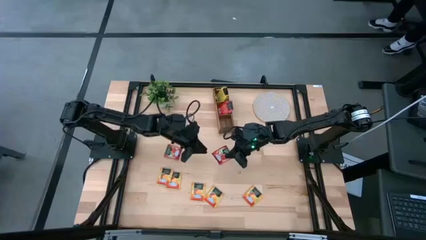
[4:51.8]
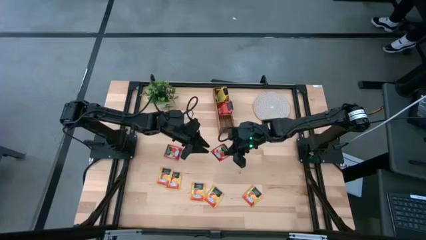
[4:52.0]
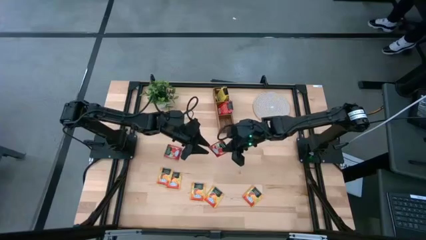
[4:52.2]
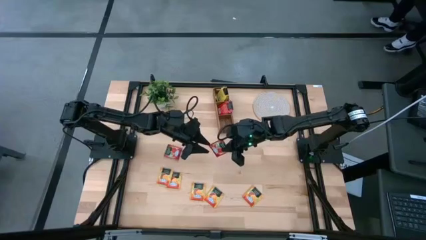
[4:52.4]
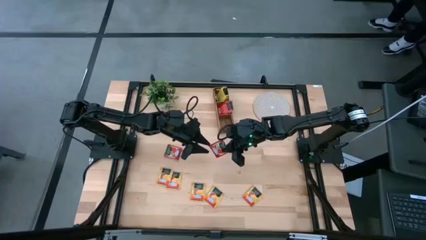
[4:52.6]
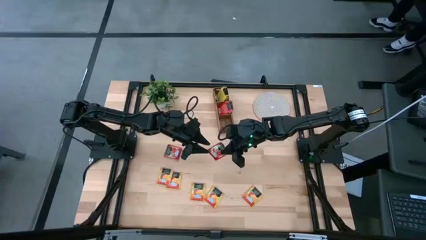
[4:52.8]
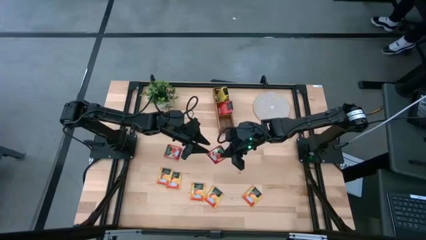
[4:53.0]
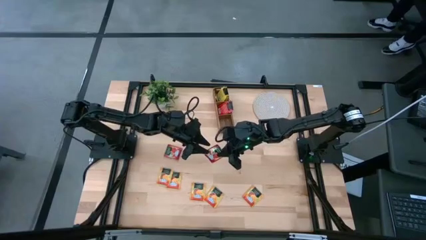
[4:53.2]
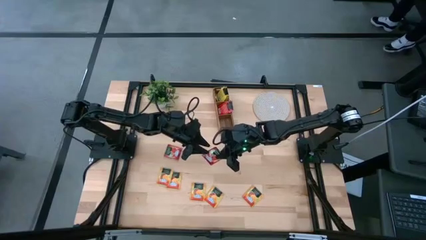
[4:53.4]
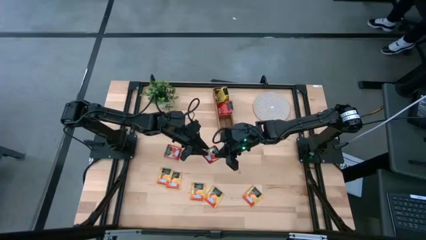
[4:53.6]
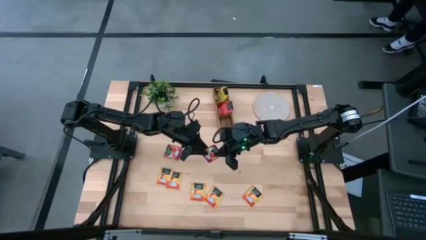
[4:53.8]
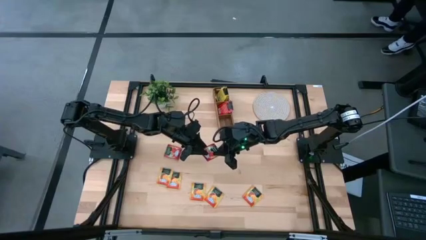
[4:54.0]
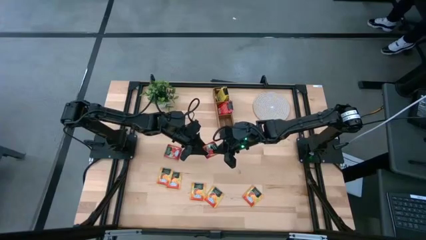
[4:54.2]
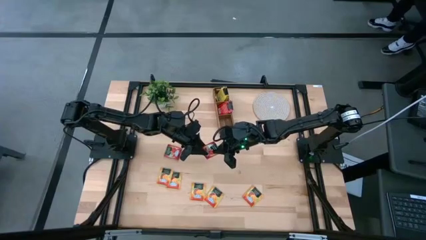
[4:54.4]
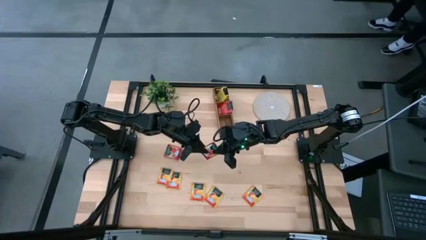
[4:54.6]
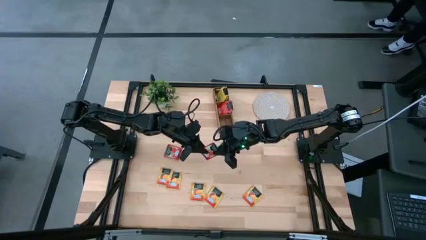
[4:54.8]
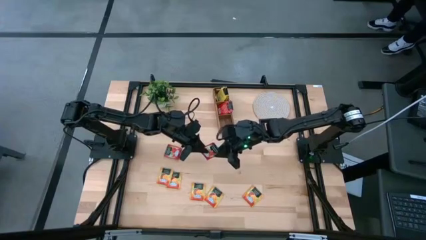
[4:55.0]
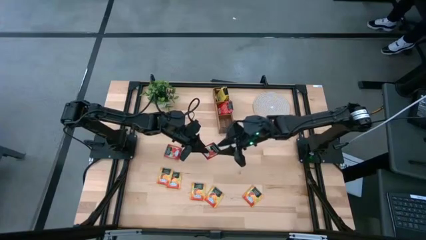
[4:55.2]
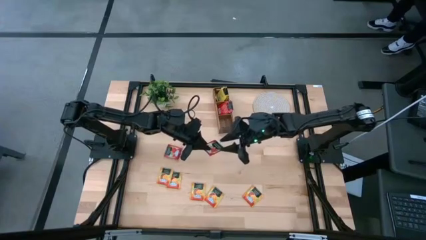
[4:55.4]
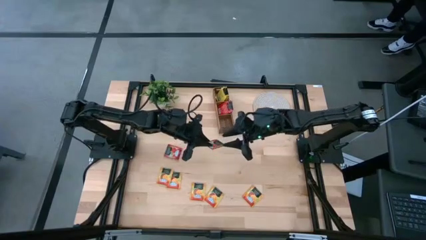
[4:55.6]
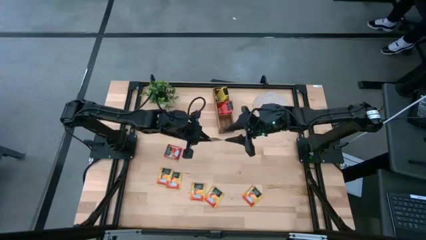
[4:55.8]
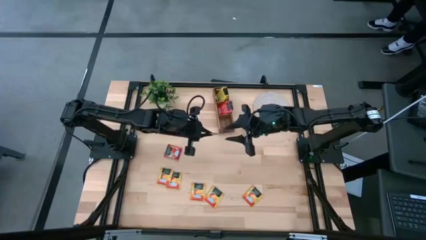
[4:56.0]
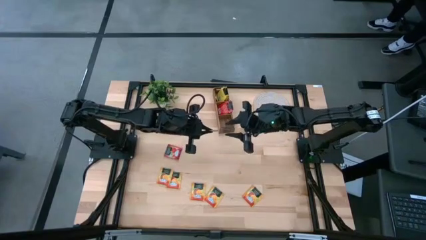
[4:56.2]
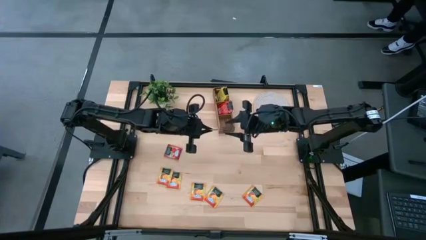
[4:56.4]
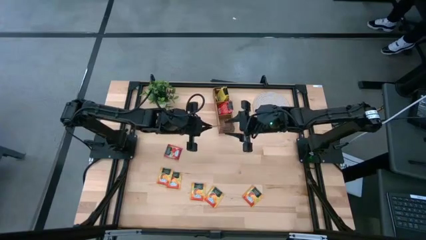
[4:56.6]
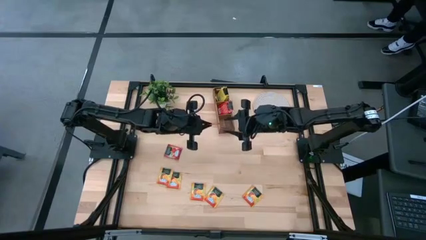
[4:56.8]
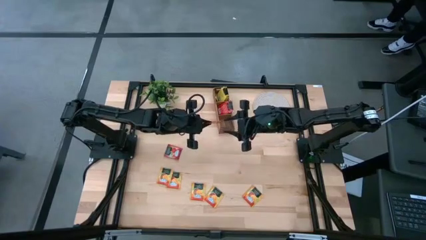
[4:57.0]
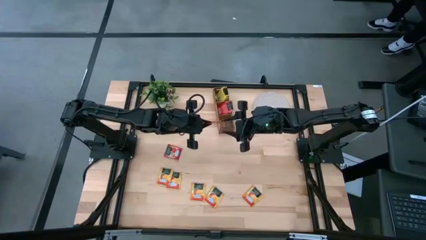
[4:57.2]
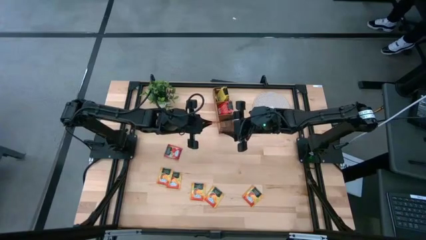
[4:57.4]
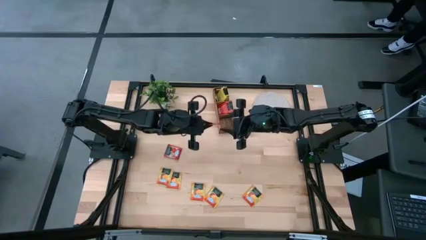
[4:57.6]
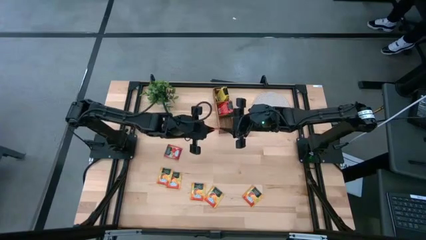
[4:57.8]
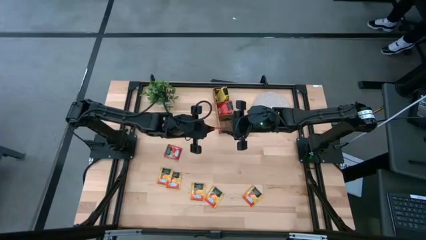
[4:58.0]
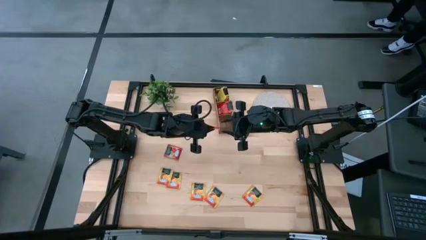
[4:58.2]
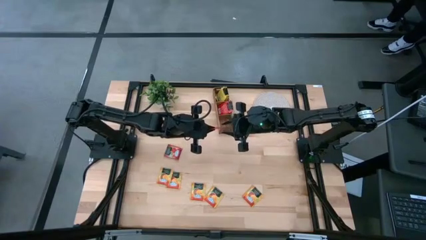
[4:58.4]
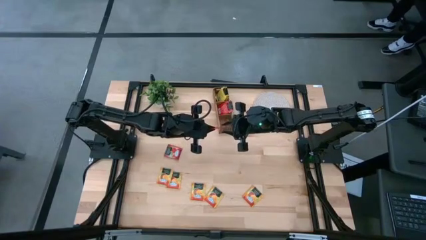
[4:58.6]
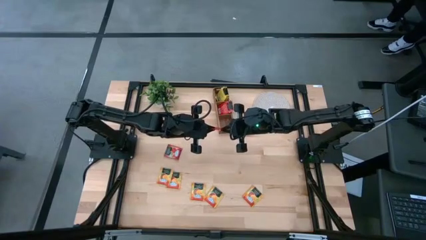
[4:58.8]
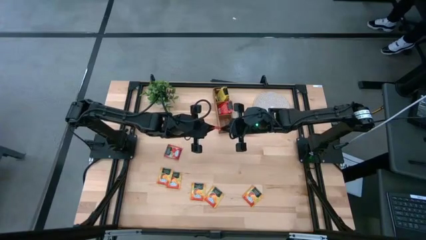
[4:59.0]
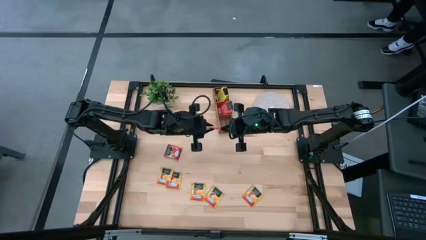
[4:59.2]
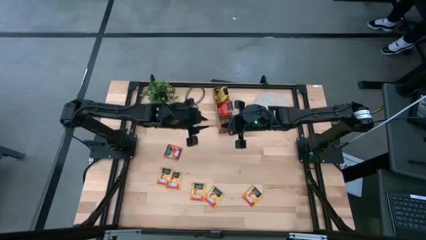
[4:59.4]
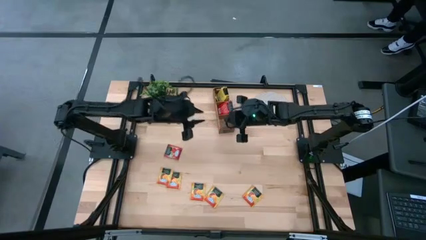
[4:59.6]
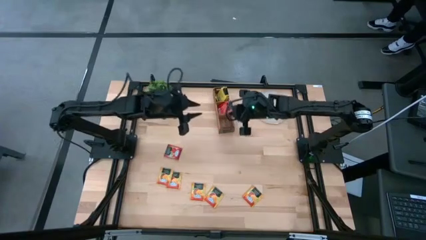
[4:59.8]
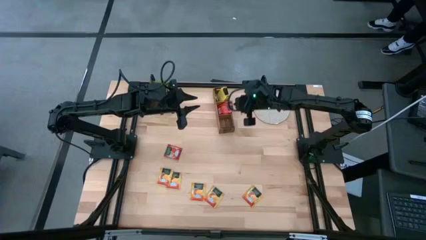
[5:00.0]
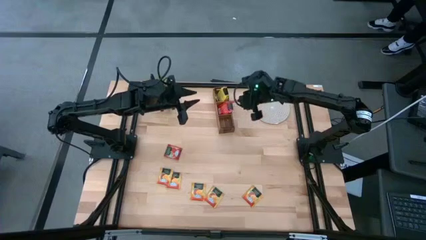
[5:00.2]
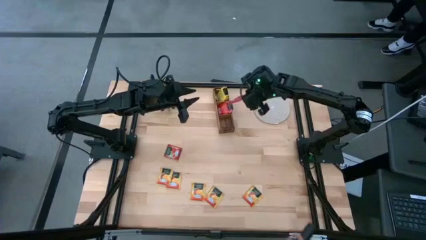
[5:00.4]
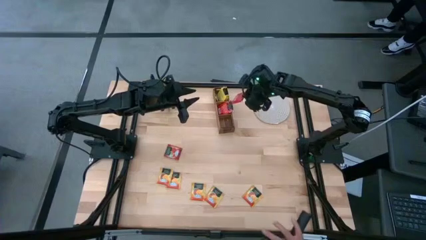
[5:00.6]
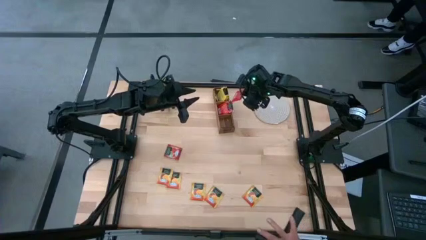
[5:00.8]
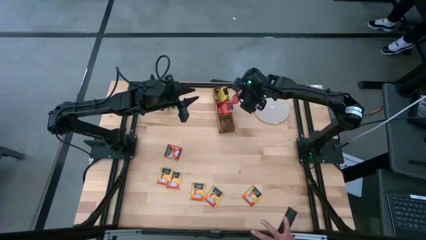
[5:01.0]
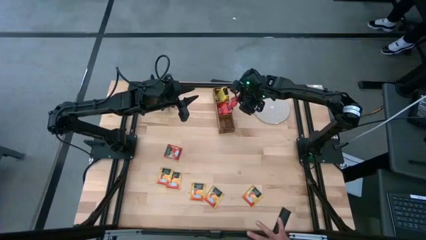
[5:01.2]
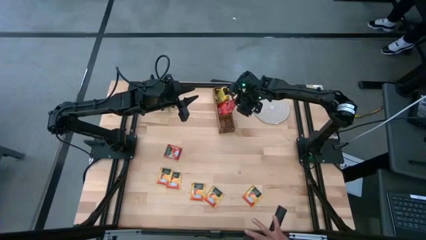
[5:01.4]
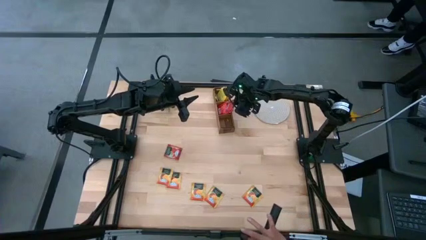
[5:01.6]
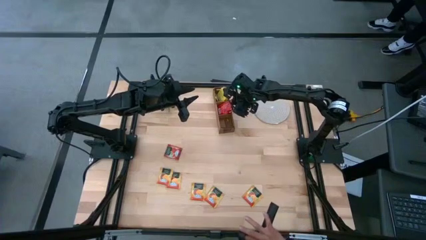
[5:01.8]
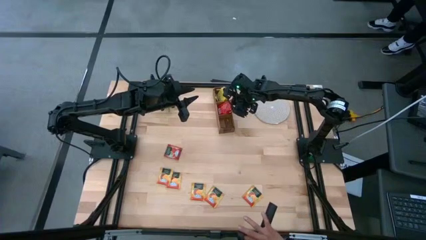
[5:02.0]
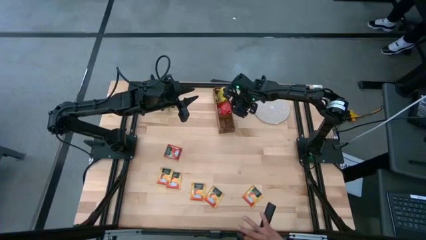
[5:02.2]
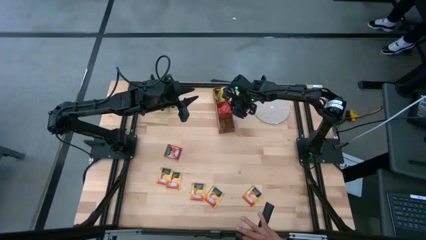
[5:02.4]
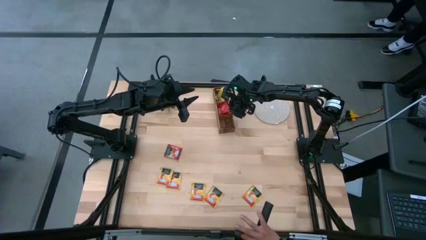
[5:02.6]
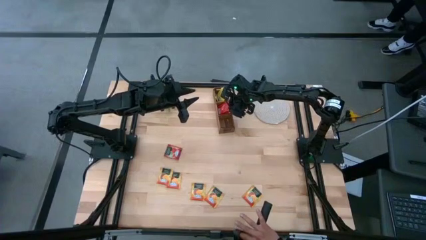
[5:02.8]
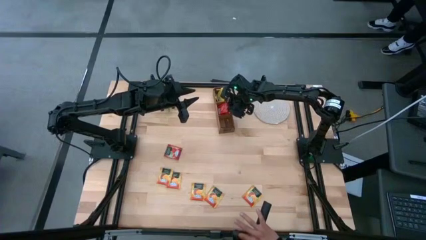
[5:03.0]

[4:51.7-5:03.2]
Task: Pick & Place Tea
Put the red tea bag into the middle section of the wooden organizer

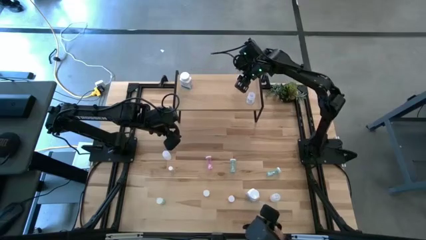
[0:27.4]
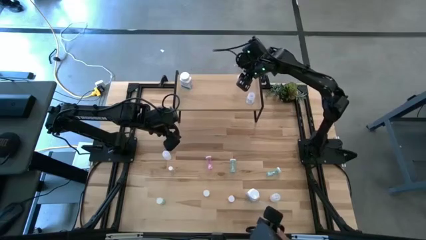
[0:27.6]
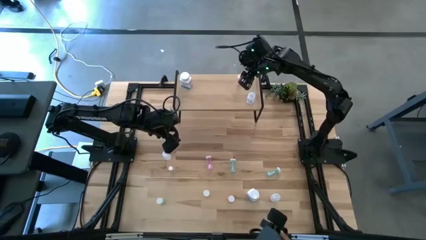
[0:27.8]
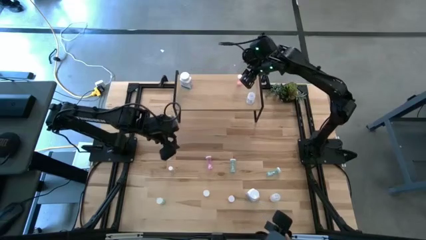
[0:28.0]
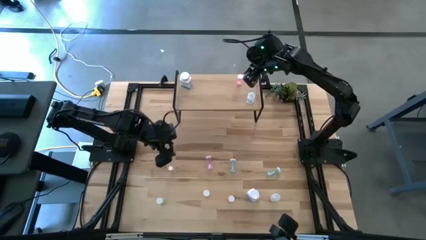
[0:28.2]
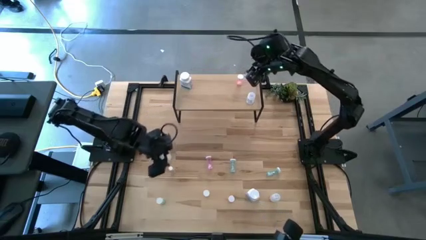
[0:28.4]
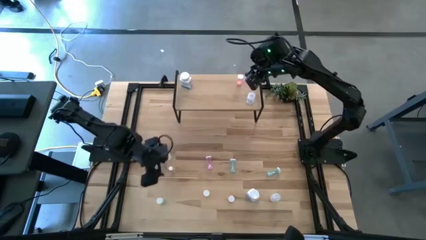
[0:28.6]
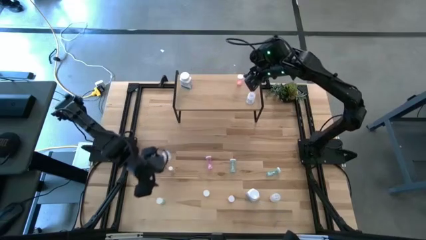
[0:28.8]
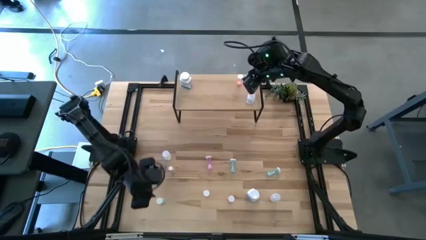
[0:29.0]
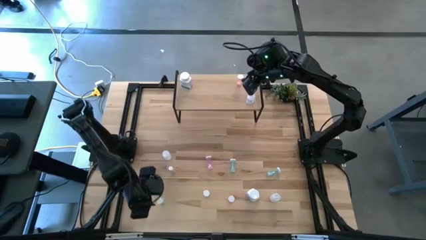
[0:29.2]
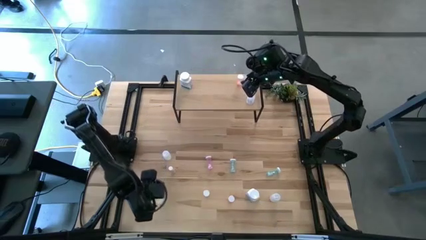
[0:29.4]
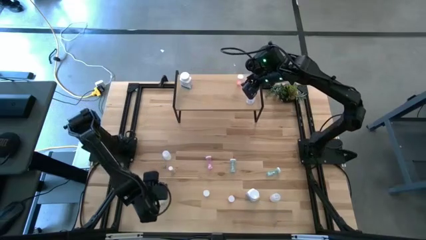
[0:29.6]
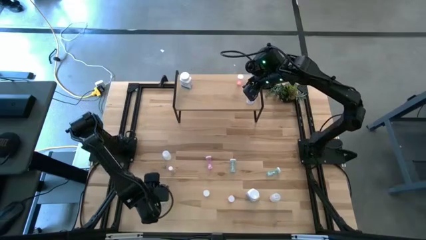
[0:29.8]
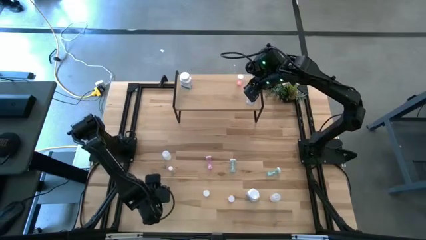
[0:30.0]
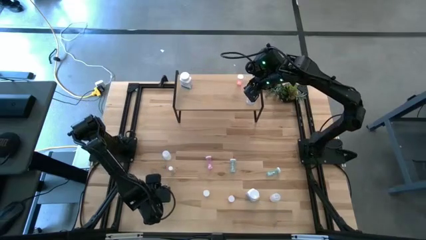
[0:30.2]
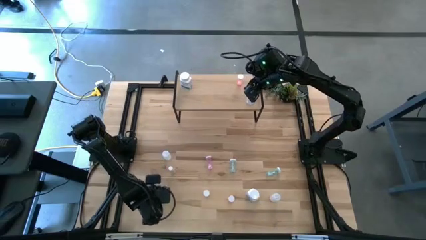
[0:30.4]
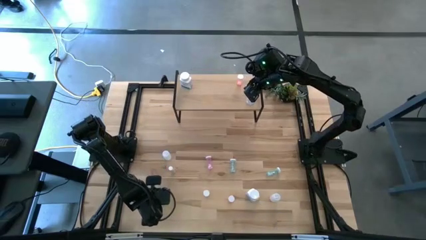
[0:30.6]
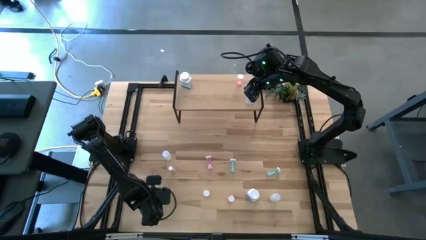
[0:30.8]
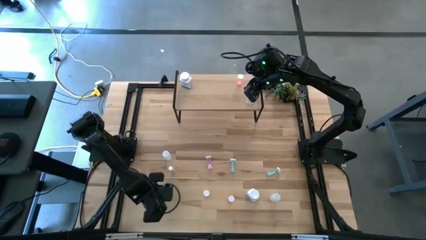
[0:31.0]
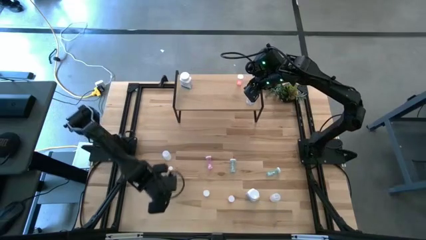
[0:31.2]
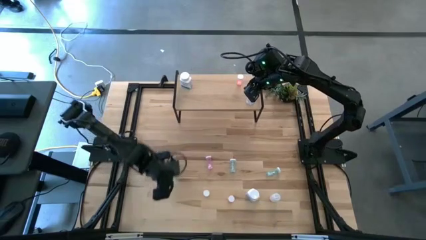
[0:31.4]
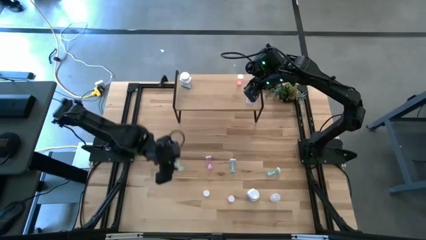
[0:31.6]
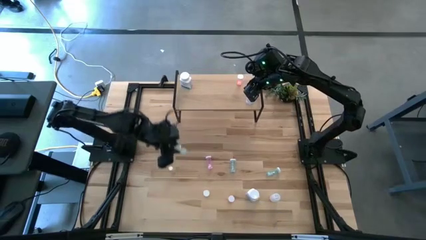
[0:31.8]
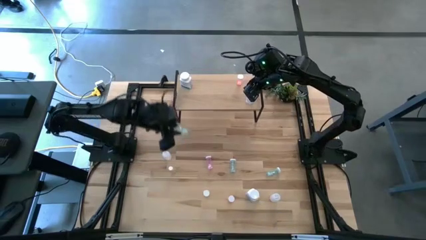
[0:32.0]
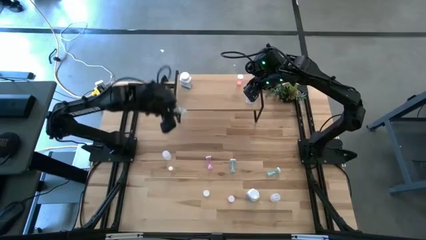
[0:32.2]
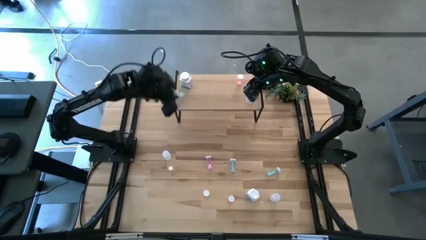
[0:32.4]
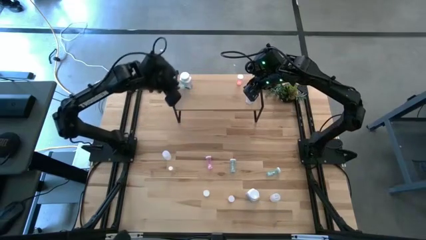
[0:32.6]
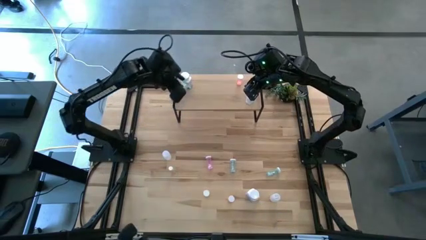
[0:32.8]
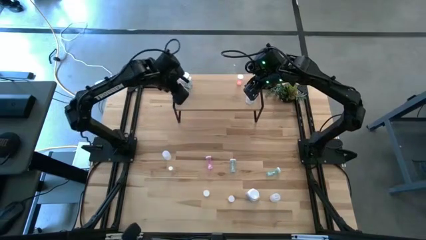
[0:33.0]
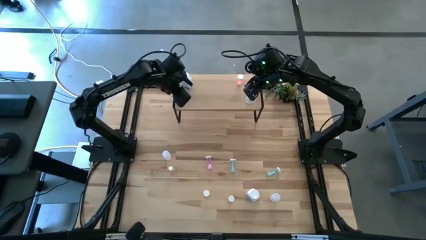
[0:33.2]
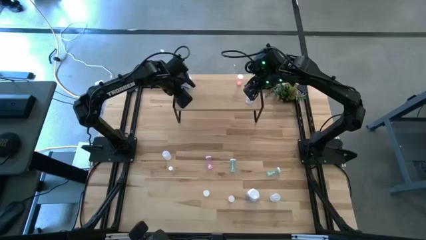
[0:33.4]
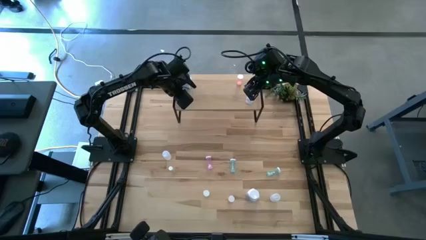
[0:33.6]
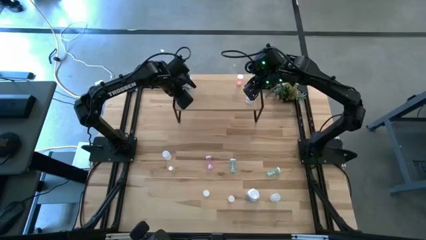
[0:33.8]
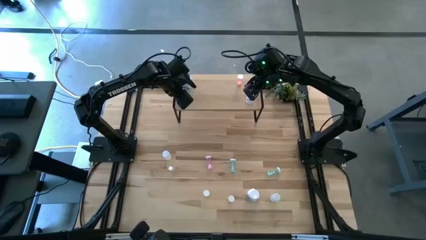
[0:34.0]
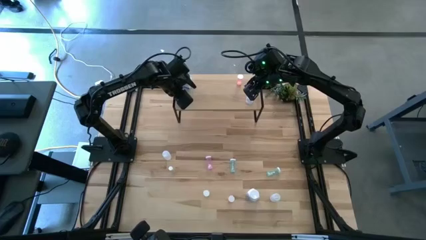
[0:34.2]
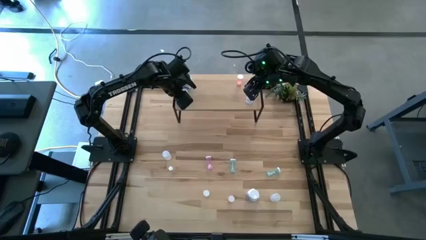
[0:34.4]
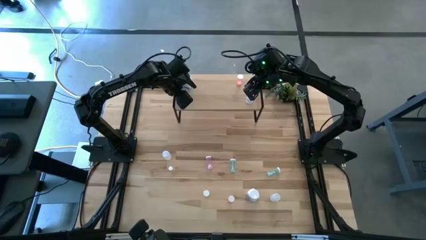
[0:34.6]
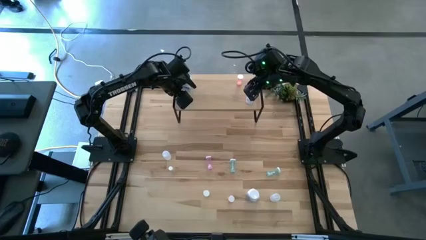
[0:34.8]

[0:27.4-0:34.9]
Task: Pick and place medicine bottles onto shelf by color
Put the bottom light blue medicine bottle on the shelf
